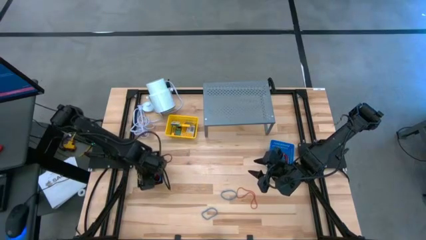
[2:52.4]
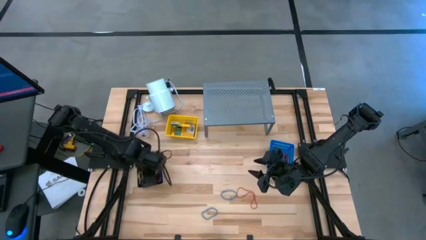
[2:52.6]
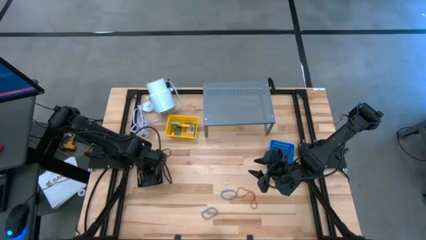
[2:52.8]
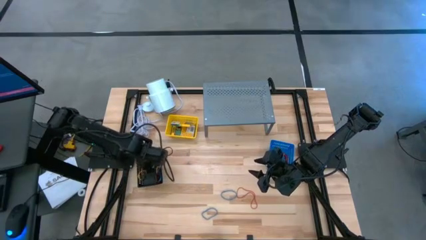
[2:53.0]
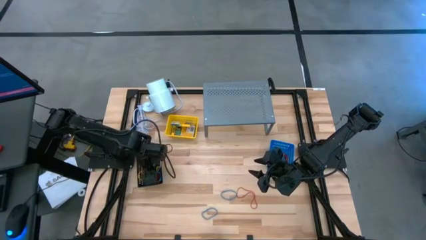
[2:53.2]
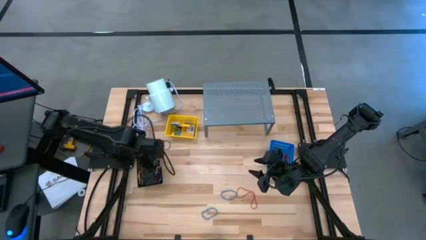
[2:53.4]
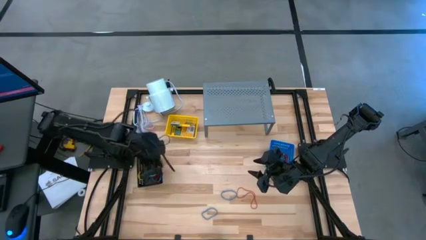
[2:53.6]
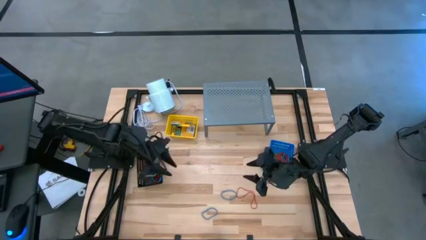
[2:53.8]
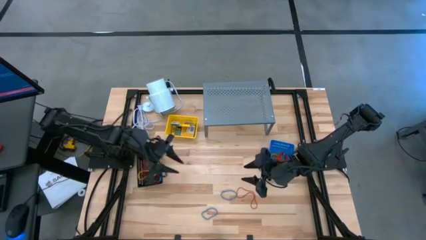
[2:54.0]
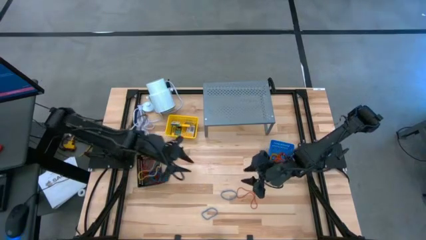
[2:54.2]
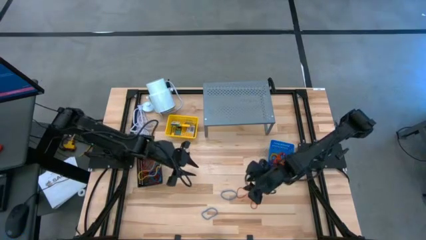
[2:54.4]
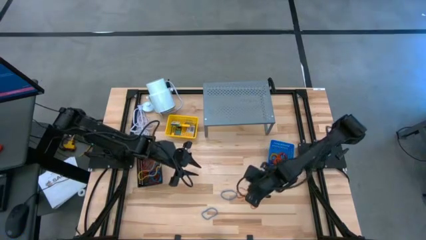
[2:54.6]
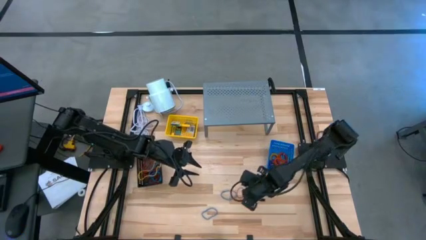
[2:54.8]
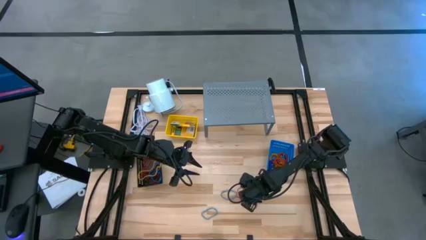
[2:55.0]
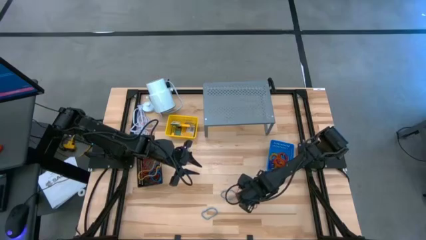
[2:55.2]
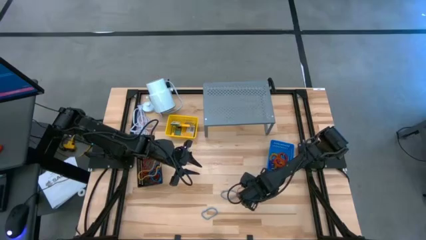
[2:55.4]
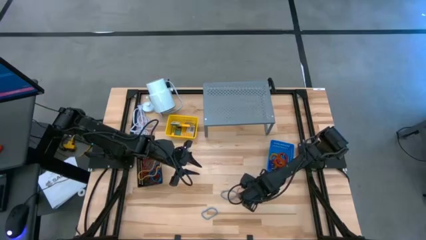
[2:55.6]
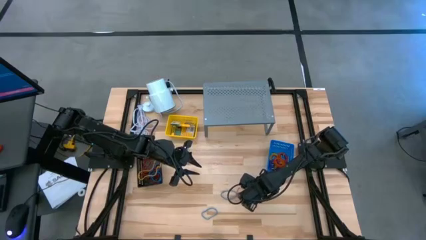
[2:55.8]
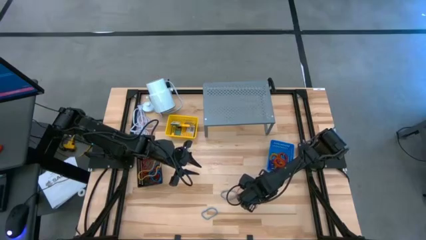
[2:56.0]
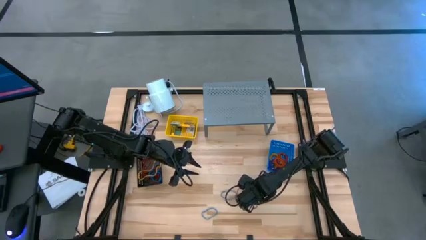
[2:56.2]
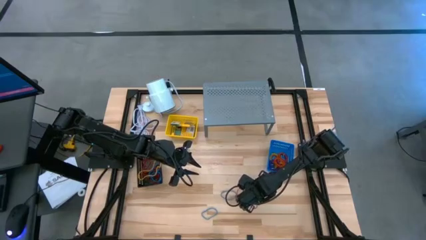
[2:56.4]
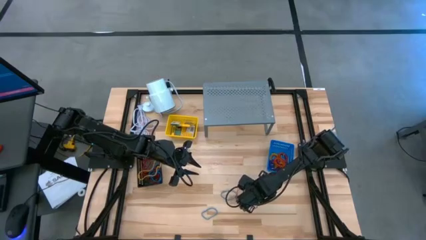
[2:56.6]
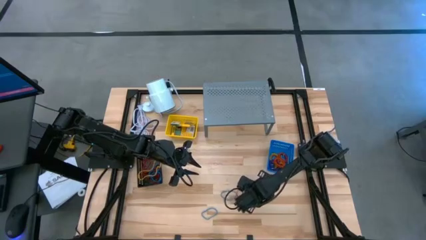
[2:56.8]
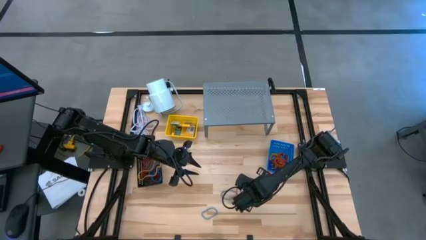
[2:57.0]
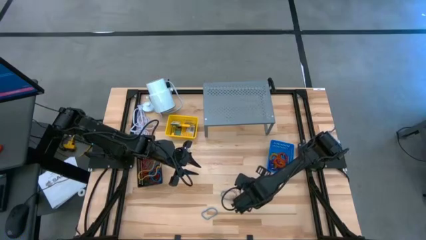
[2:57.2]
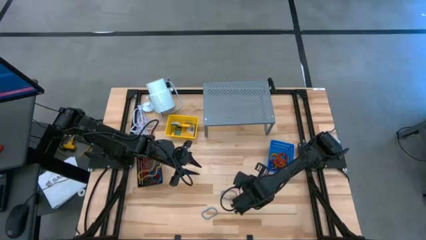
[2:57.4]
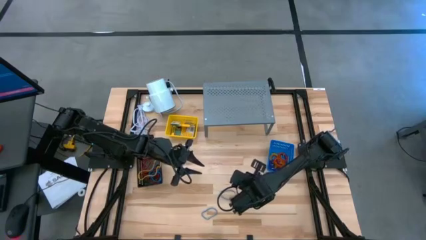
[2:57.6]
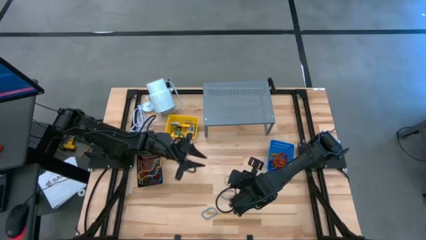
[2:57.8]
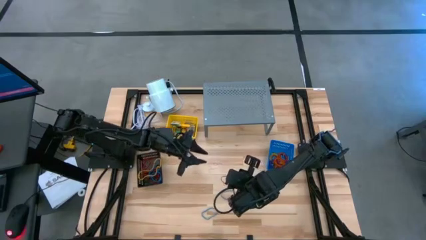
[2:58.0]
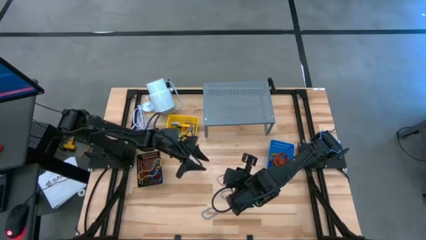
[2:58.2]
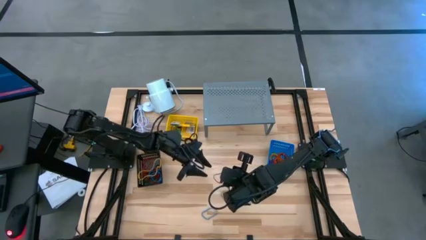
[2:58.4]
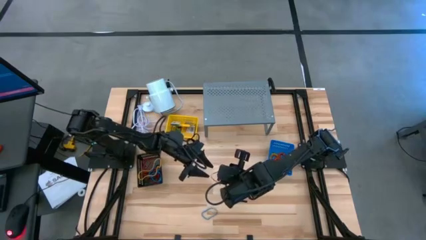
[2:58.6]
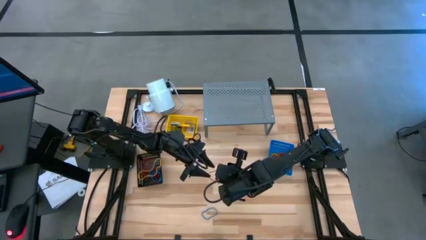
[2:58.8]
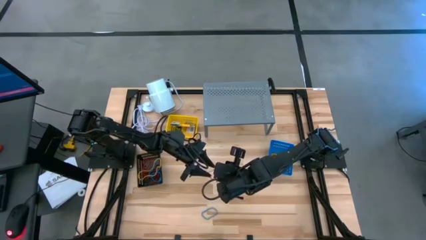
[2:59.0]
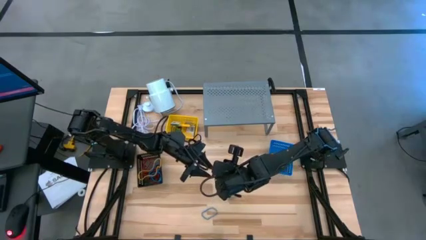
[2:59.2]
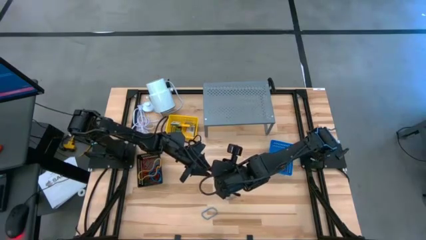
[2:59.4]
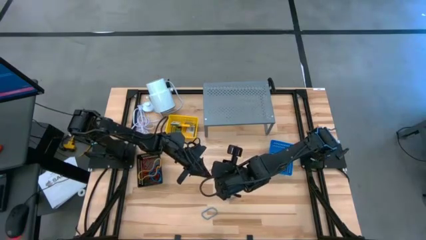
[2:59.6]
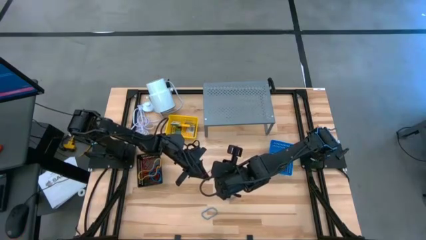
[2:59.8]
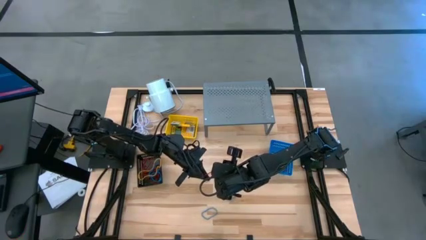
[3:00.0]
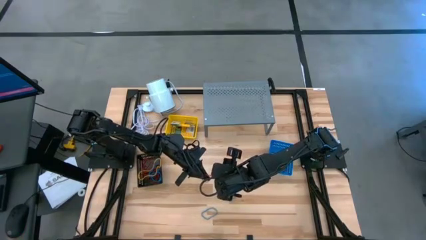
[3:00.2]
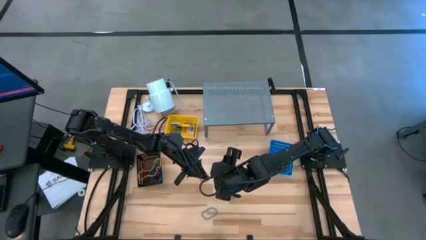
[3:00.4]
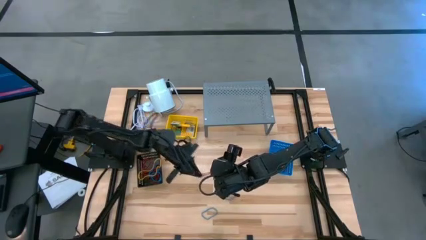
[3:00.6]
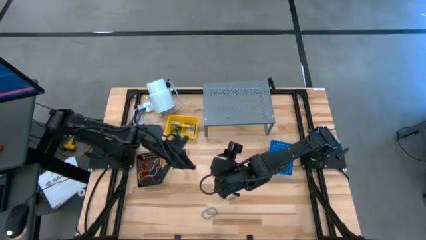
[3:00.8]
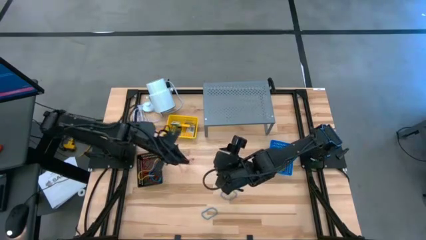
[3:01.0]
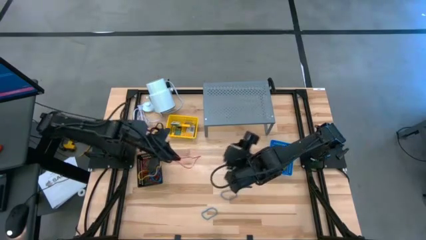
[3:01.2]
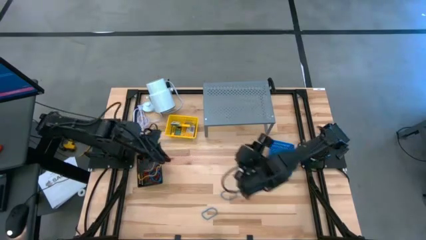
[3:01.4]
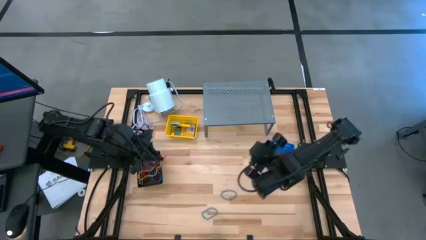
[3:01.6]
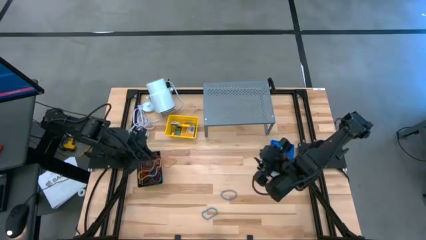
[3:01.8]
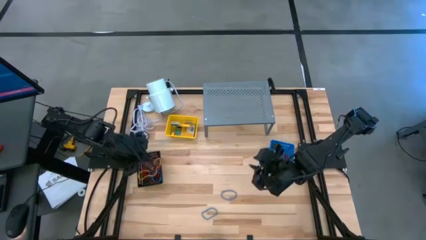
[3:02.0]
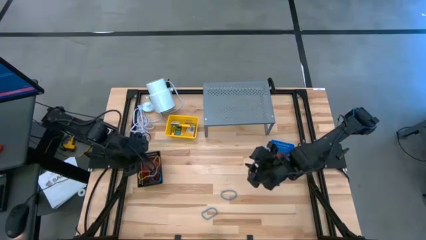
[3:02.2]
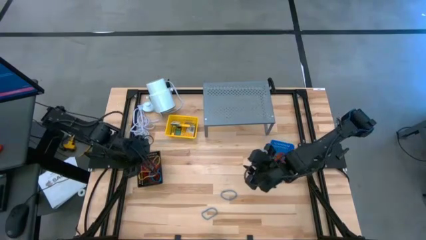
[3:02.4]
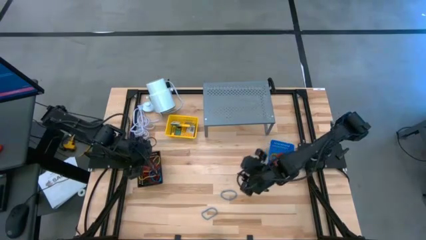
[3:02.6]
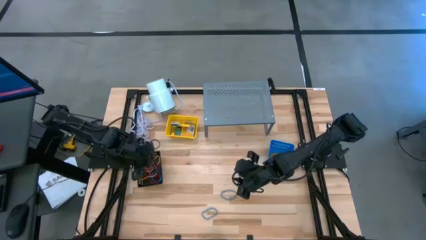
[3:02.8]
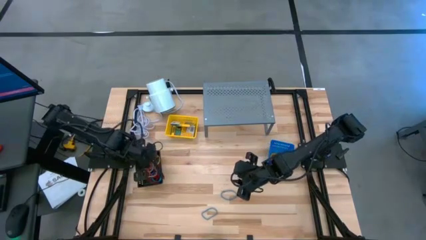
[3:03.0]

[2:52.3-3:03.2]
Task: Pick & Place Office Desk Supplies
Put the red rubber band into the black bin

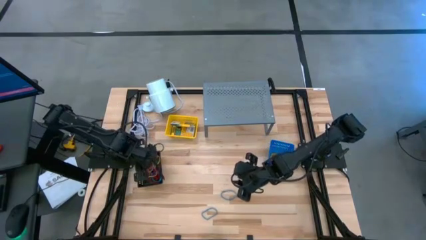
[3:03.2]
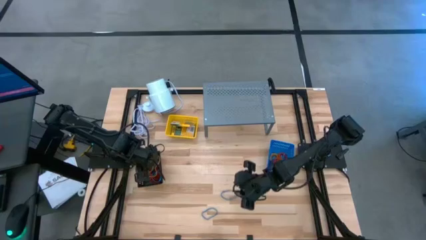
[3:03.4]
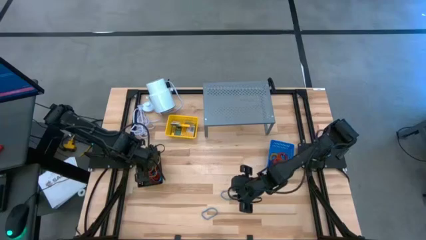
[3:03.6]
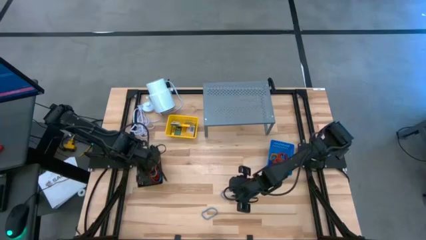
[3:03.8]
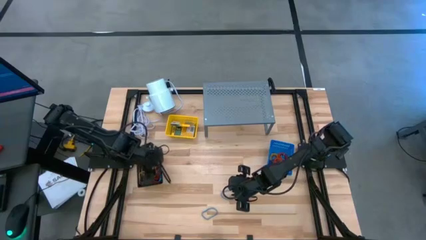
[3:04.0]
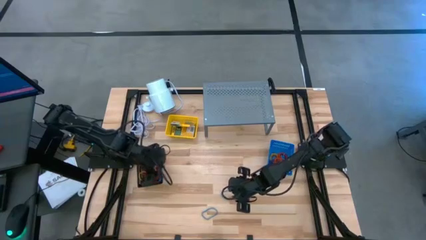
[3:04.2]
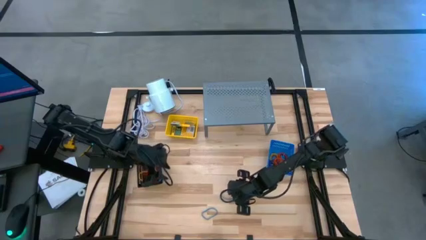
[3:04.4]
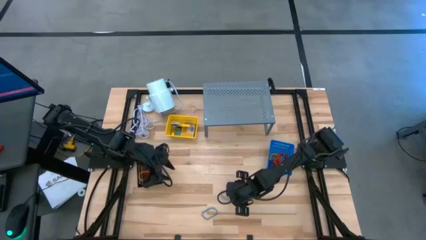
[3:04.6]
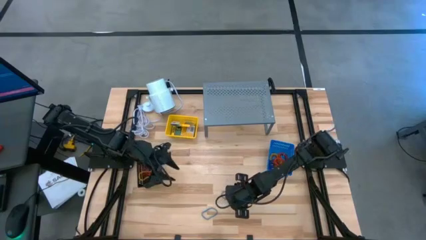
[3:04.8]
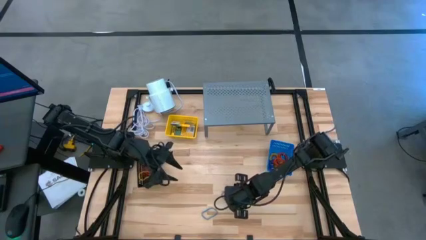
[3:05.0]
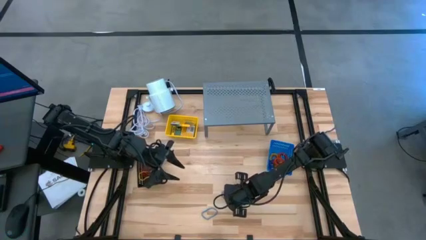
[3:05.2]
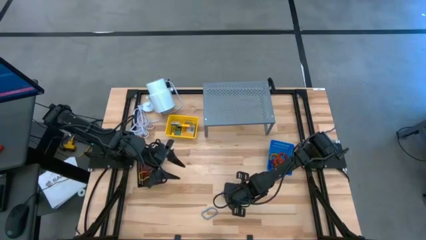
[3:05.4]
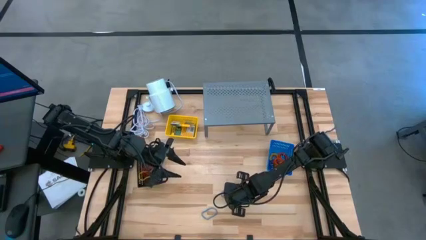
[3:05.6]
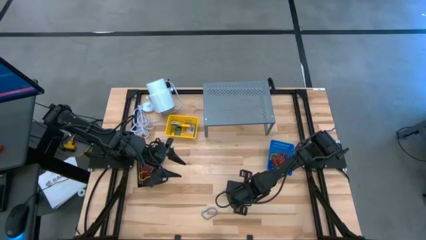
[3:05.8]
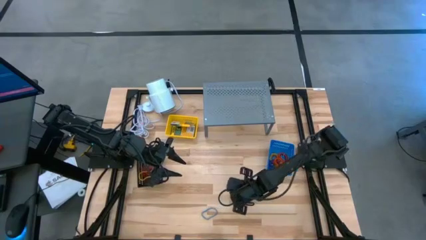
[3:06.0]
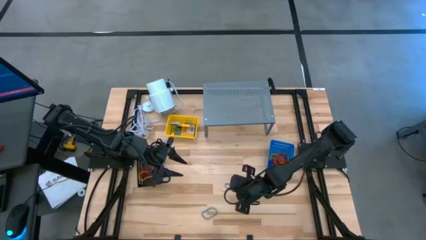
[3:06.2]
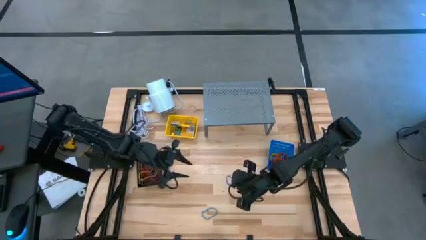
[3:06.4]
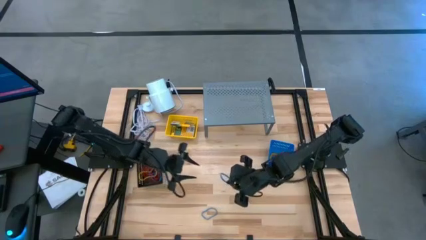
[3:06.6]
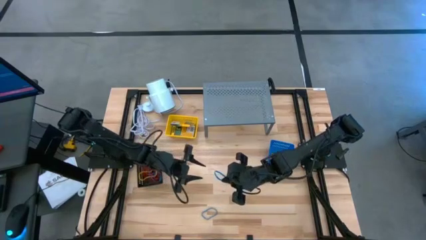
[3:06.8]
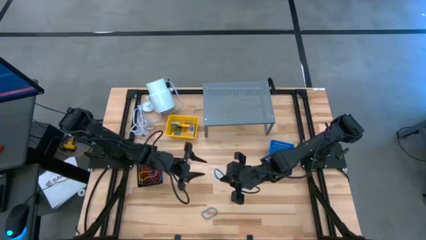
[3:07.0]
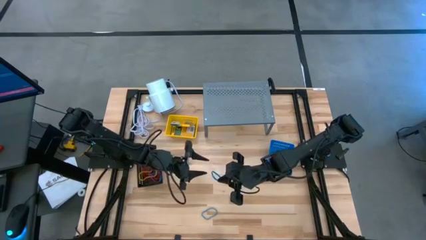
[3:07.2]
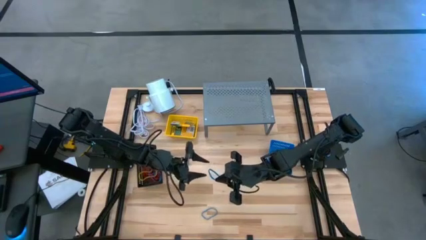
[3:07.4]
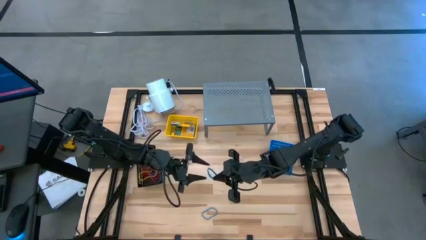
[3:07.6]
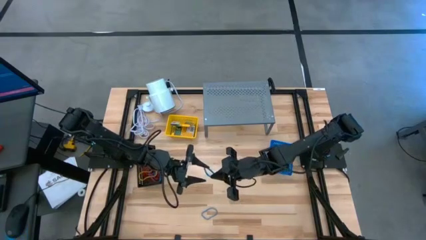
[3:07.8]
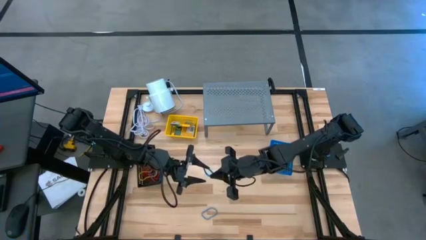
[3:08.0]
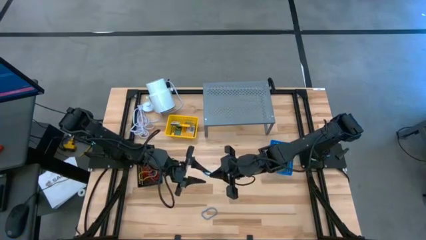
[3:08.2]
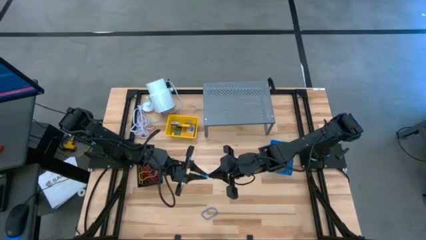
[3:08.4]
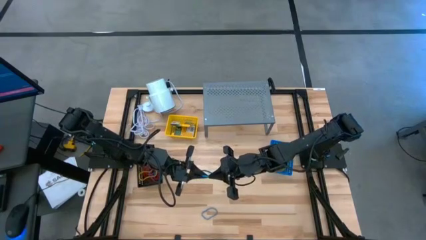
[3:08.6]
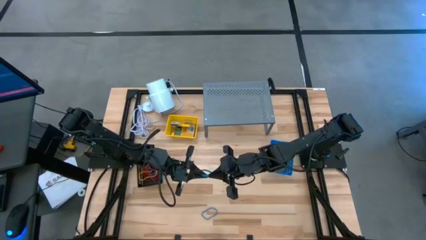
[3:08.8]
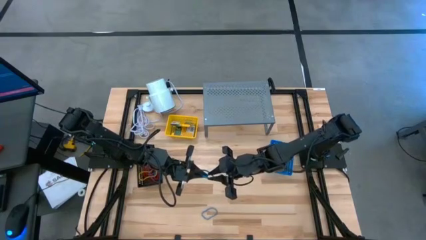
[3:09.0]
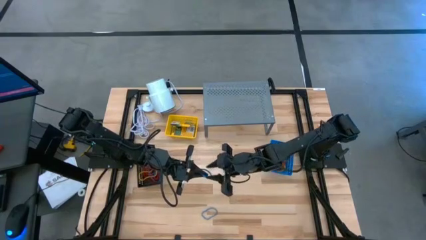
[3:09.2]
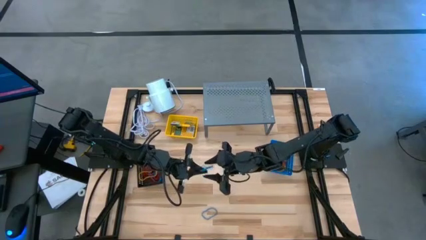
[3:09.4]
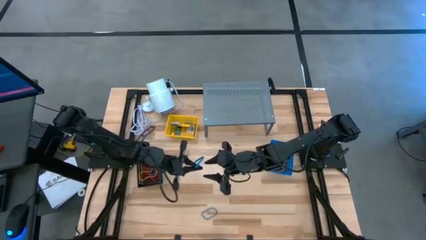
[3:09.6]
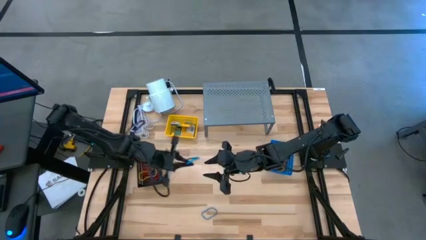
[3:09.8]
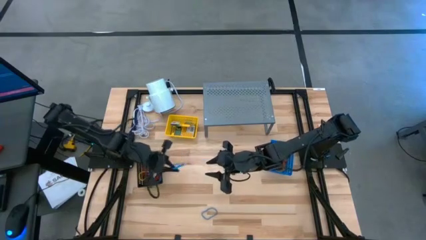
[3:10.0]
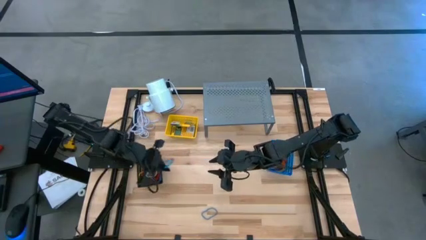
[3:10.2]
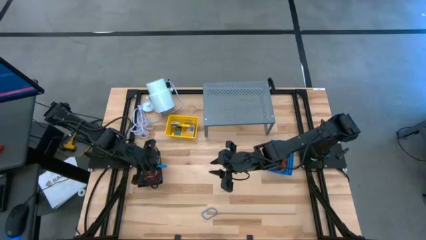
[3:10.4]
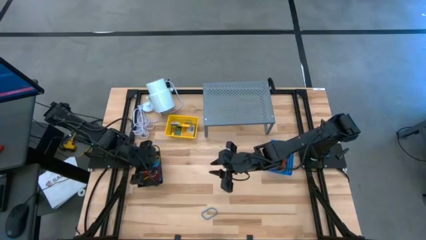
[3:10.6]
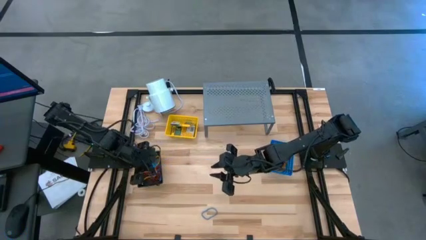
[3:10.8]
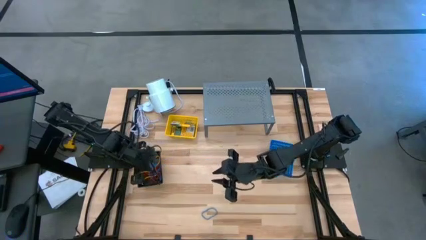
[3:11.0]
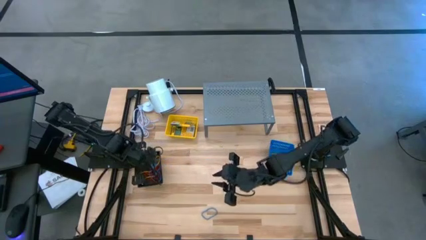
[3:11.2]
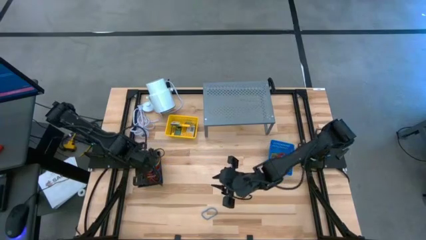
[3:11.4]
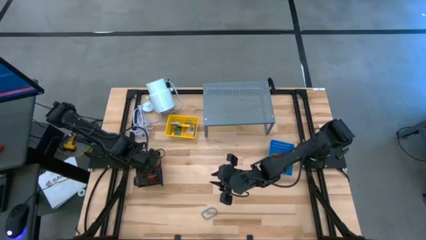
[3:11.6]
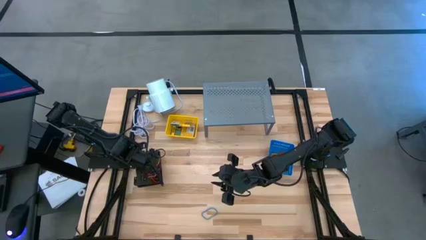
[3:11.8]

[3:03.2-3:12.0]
Put the blue rubber band into the black bin
